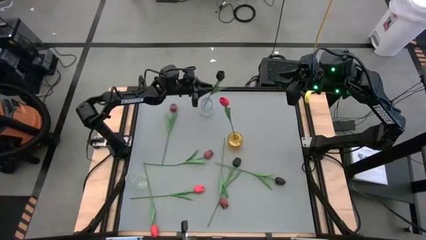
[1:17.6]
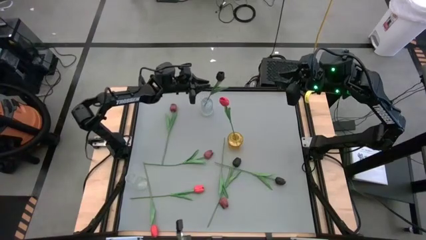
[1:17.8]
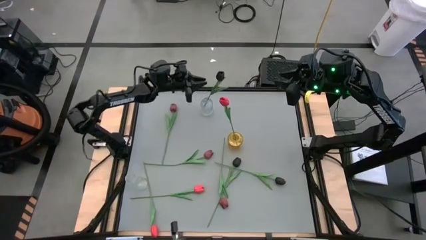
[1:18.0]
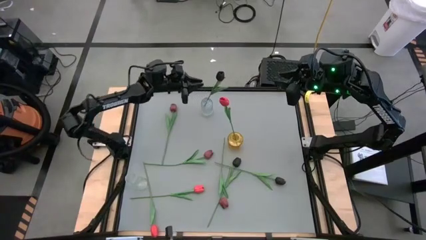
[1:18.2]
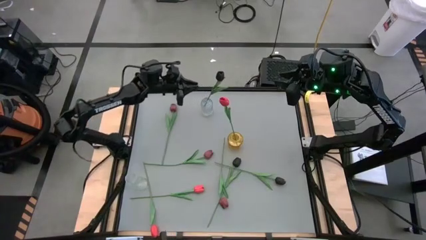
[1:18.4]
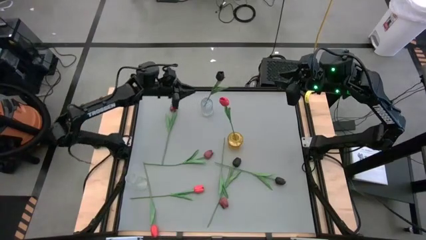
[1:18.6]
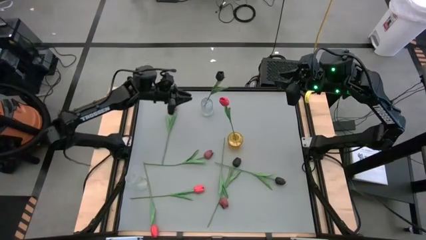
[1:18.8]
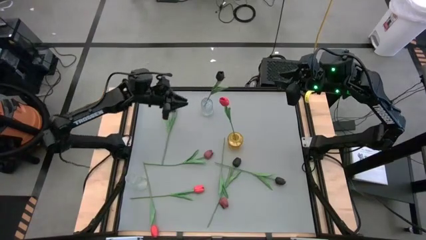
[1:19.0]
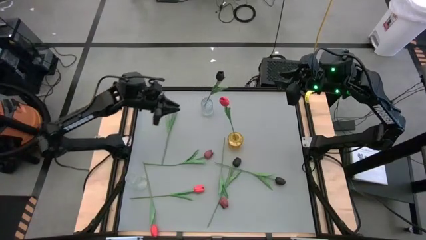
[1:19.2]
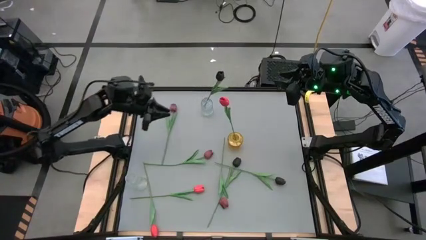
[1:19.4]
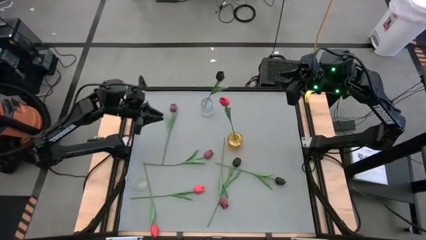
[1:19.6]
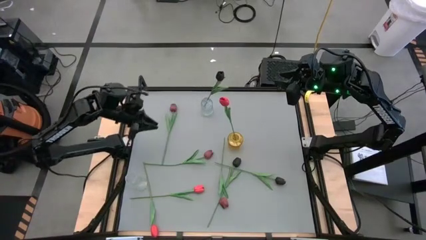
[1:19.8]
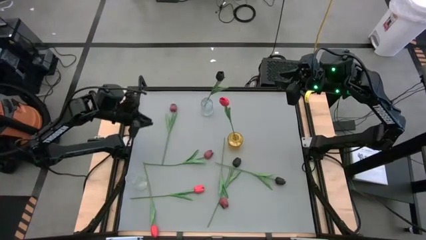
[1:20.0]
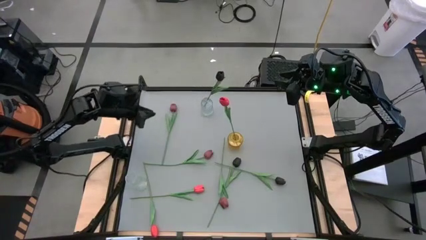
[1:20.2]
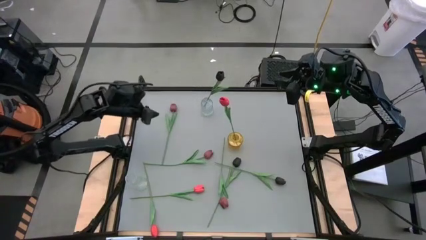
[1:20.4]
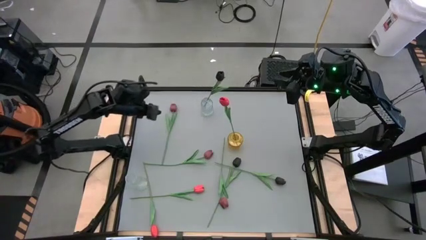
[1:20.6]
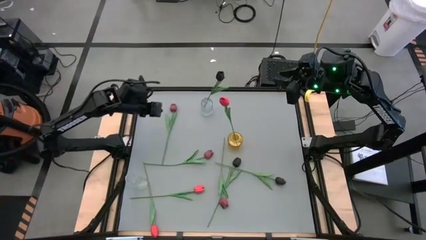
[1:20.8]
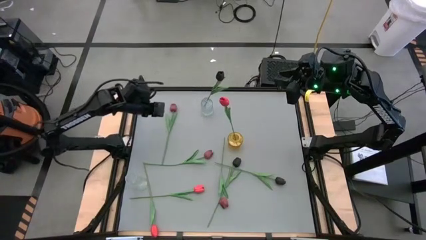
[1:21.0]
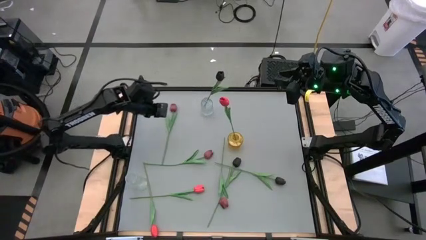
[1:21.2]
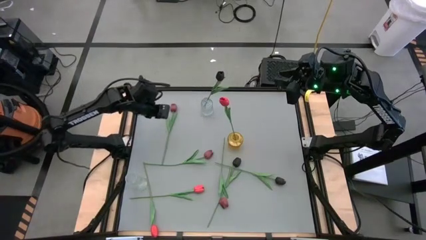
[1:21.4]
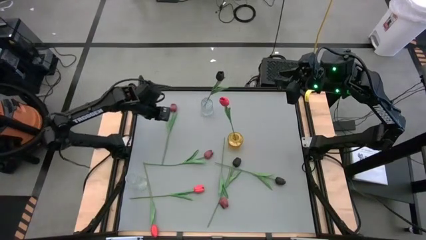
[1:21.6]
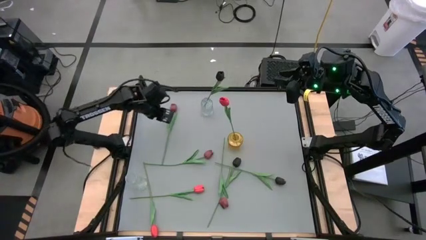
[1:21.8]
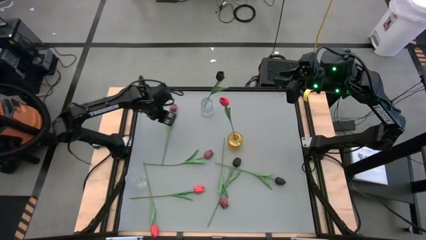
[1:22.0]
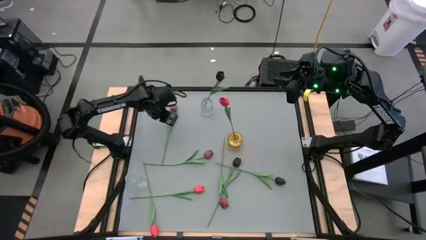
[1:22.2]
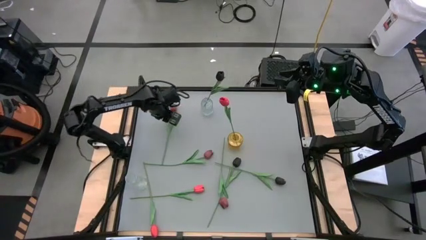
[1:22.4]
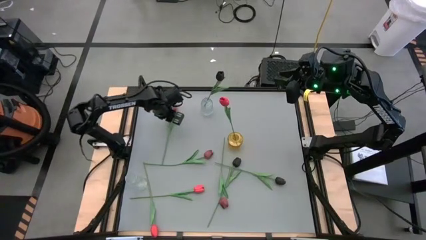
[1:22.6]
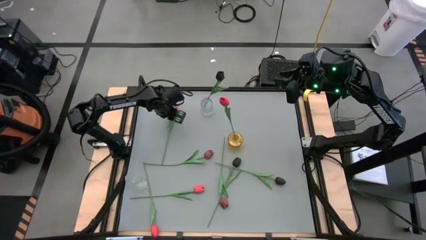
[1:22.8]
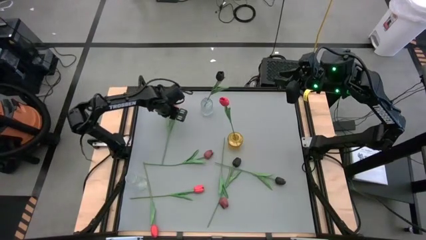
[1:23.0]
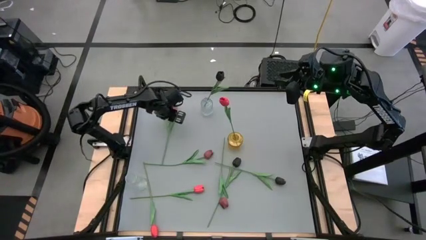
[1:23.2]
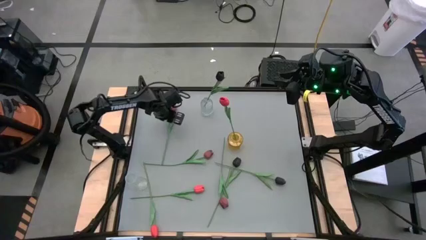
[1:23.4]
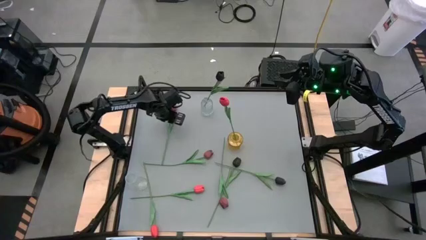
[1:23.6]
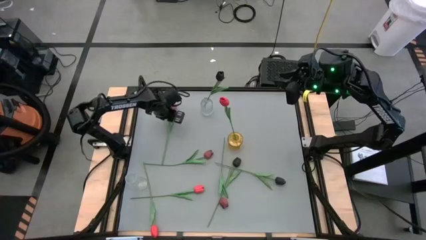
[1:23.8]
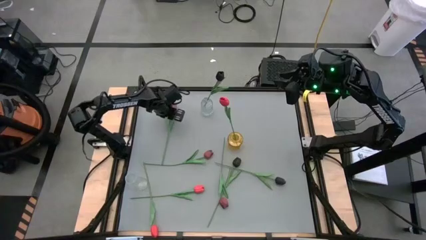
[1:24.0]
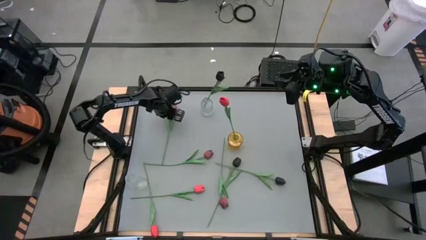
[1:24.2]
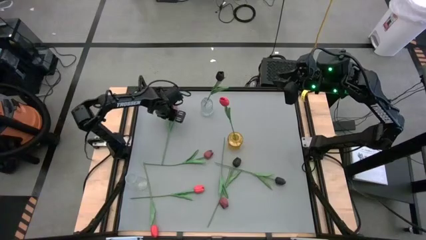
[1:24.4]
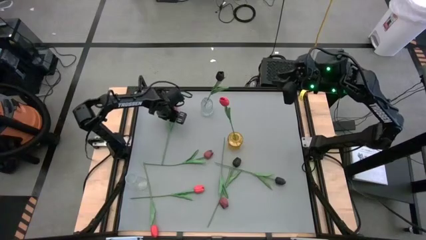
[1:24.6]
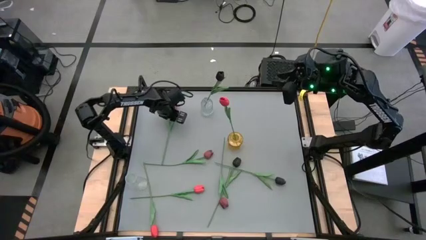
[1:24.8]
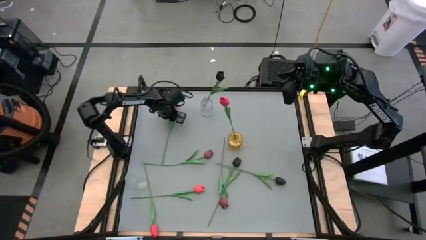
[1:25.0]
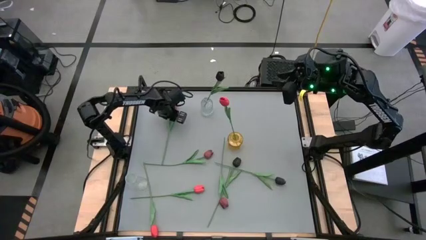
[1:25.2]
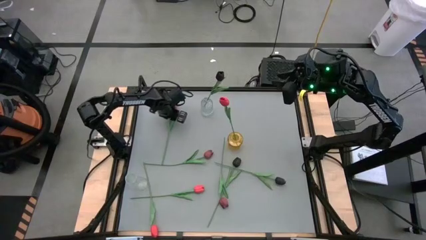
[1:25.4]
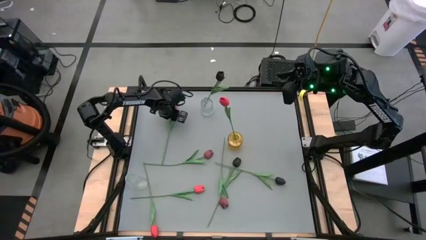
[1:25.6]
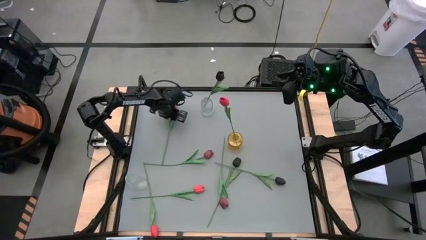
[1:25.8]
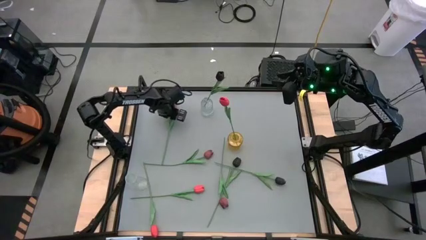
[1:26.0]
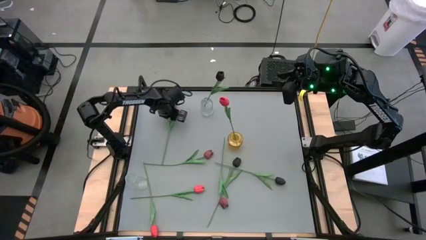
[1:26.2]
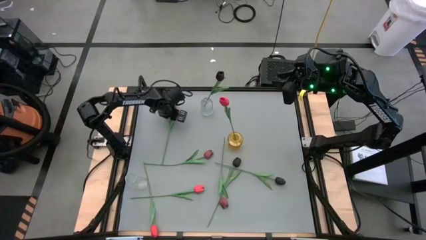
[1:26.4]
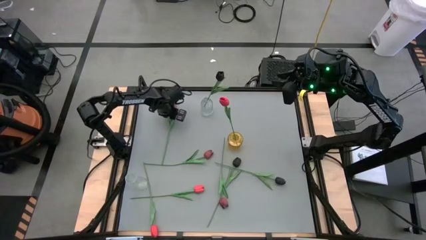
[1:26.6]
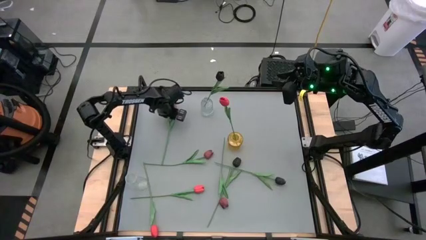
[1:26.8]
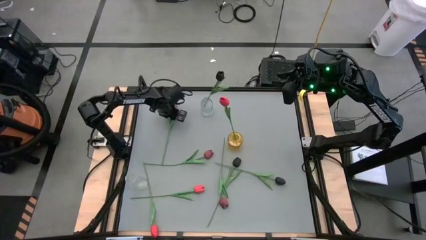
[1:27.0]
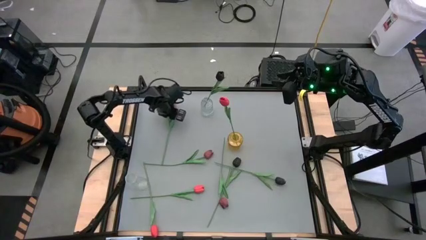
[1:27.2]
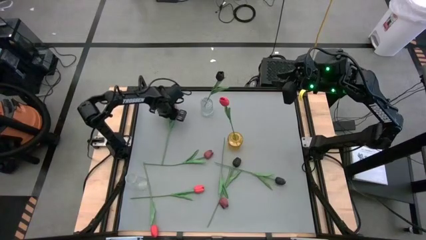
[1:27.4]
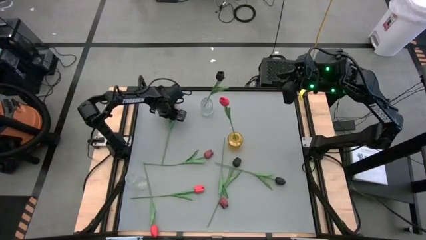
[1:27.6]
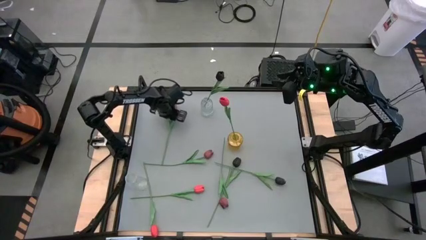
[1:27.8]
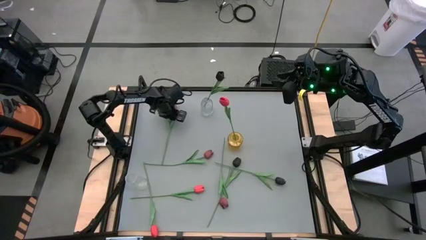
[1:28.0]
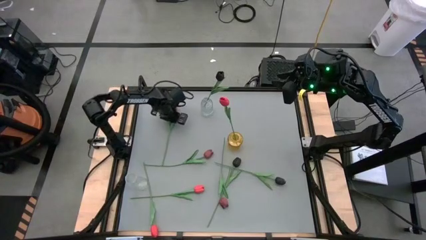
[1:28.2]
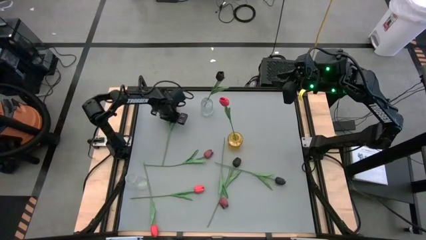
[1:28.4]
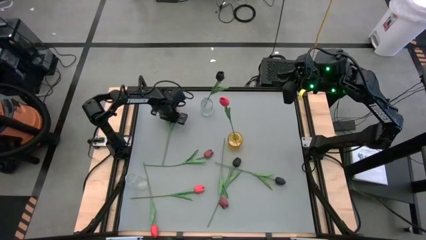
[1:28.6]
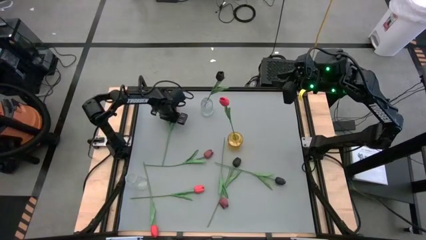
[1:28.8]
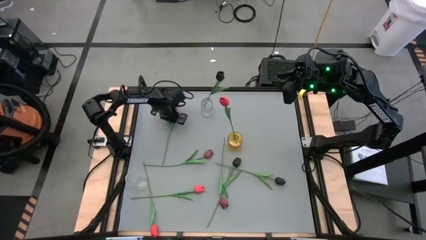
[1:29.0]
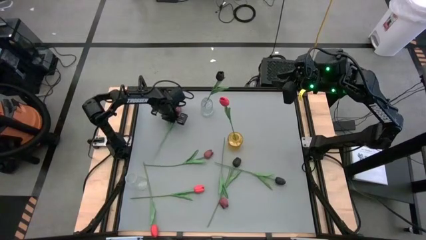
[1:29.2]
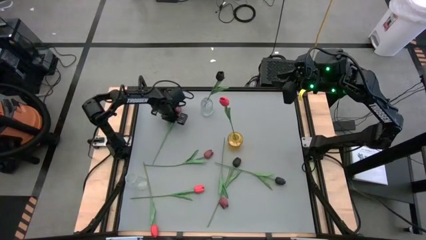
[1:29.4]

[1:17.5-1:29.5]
Task: Sort flowers into vase by color
Put the top red tulip into the bottom transparent vase

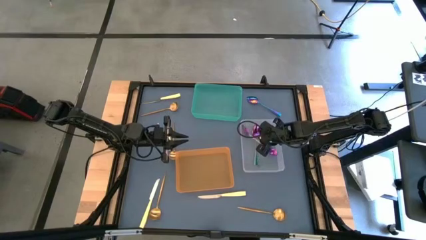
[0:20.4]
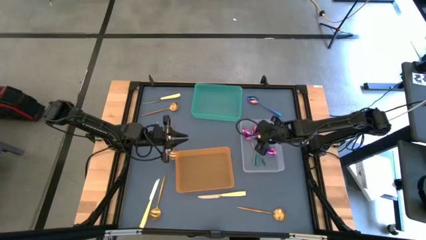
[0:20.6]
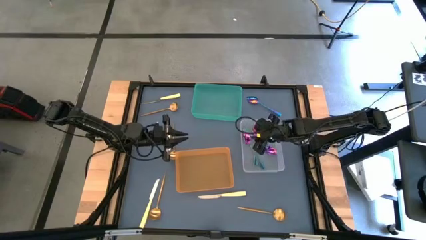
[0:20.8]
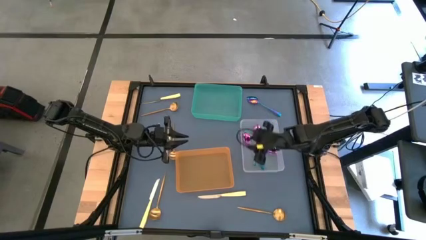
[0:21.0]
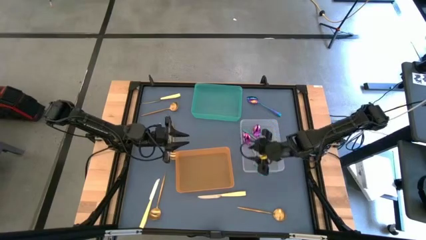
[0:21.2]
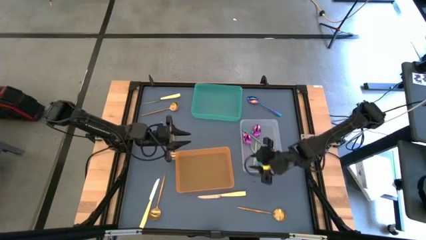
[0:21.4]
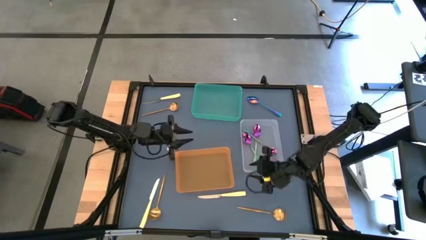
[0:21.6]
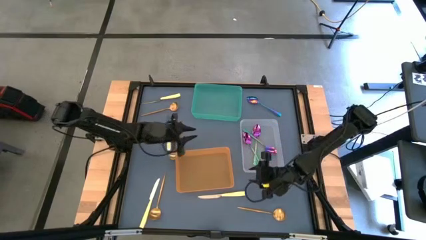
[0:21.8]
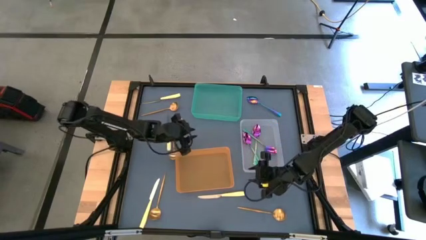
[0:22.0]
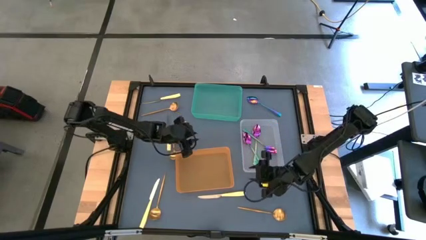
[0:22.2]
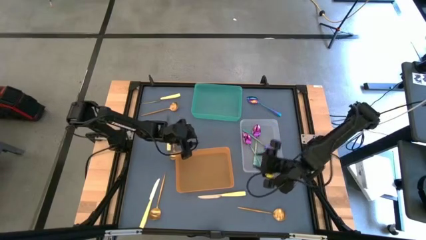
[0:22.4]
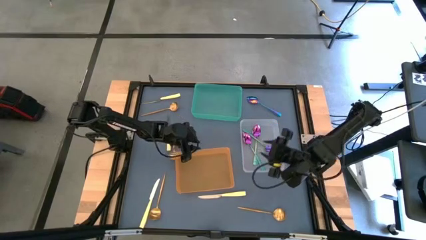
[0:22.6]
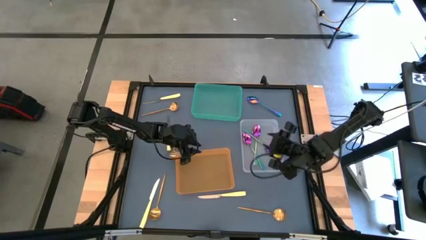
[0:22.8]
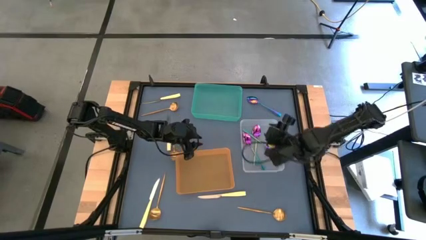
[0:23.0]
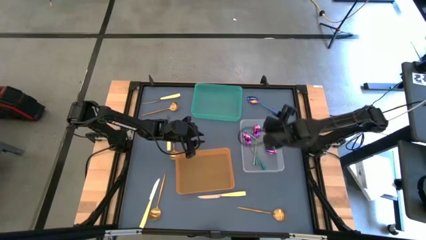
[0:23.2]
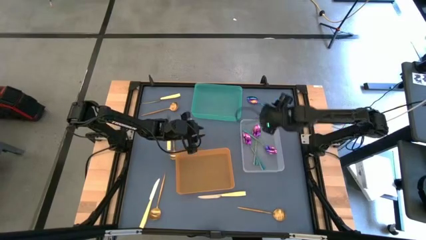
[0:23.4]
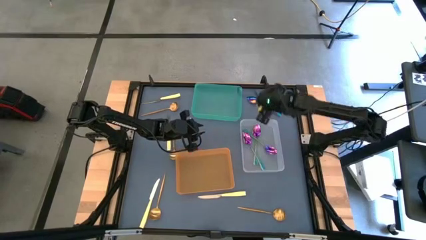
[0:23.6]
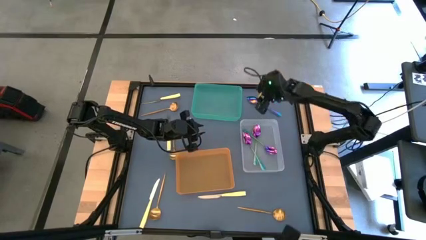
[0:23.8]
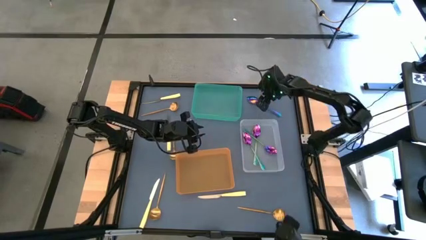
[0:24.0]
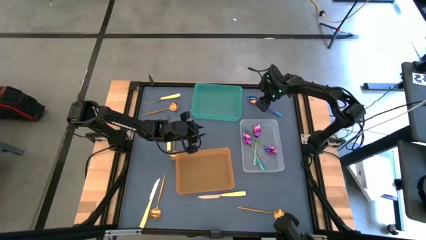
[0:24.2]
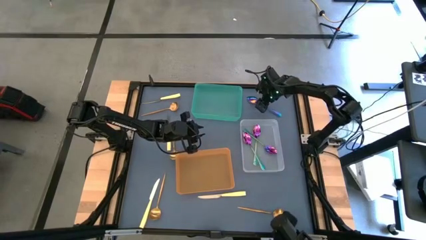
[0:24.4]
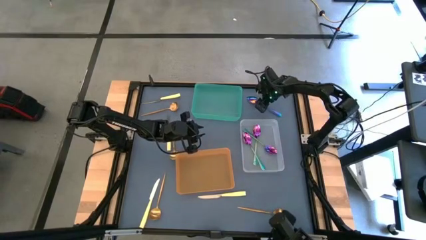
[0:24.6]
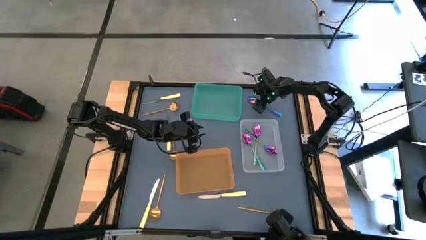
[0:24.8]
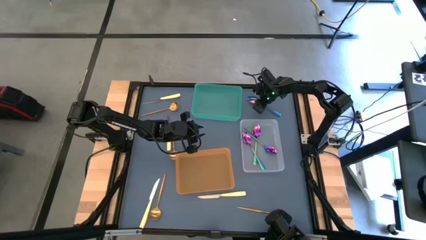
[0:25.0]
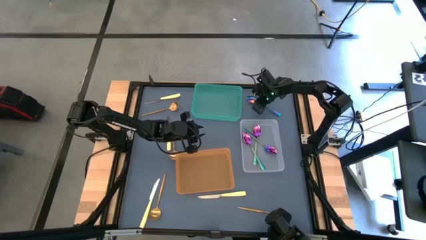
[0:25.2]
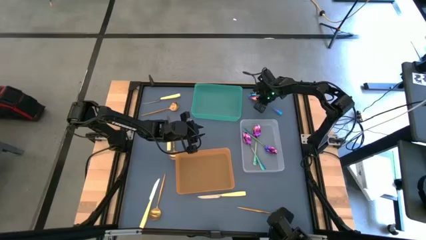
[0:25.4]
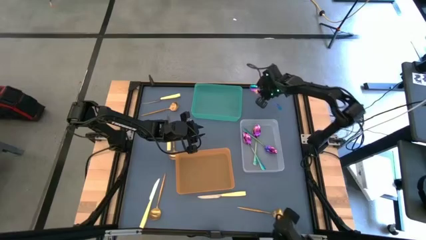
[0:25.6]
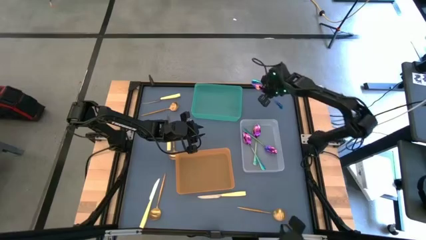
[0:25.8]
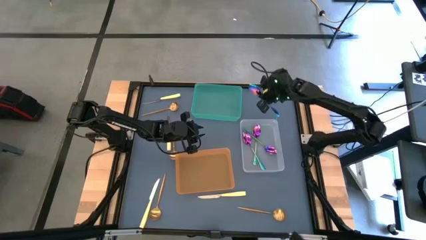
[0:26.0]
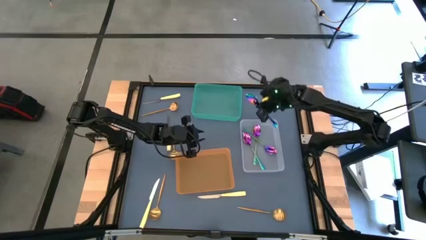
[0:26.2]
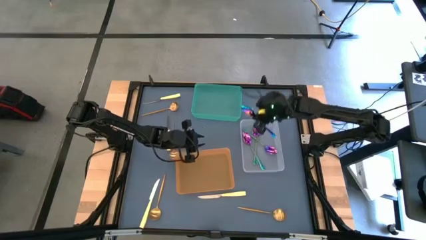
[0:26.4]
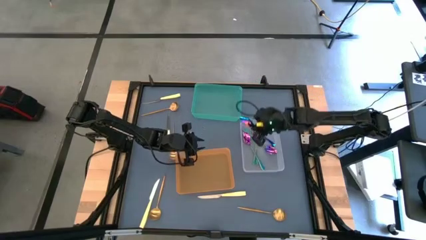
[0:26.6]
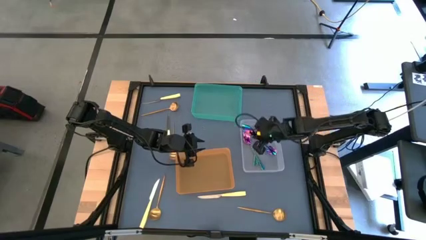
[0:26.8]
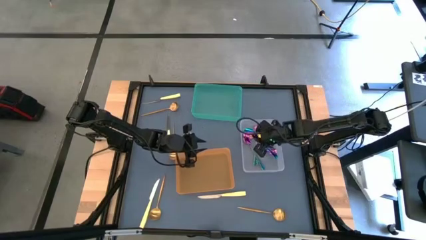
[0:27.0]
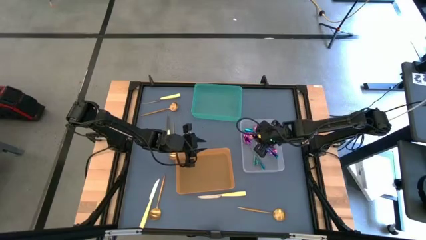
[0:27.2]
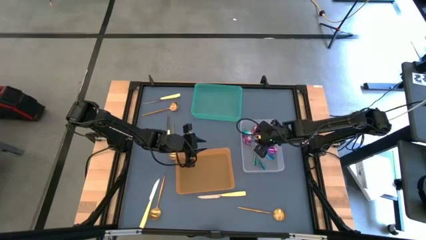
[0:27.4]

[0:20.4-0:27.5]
Task: Sort silverware by color (type)
Put the blue spoon into the transparent bin
